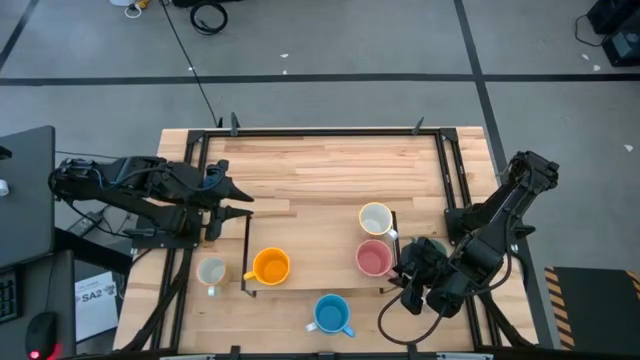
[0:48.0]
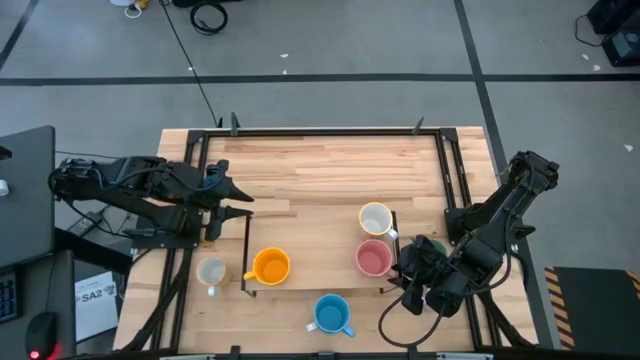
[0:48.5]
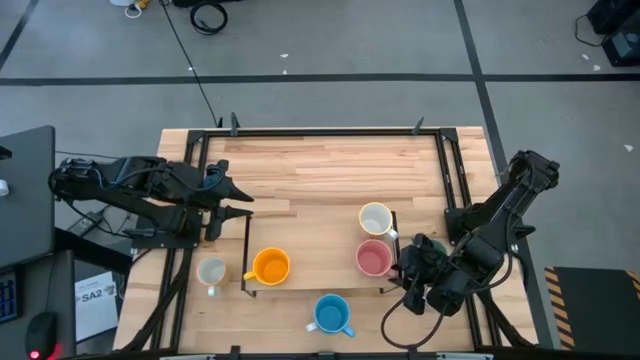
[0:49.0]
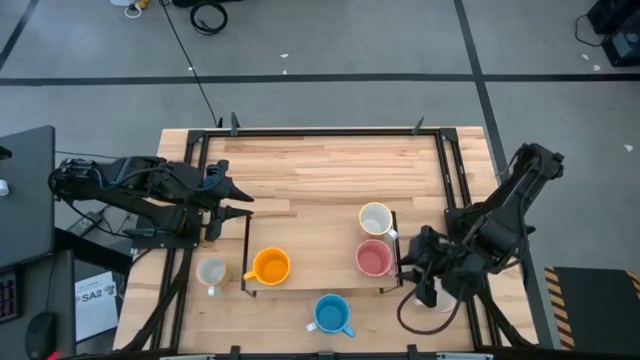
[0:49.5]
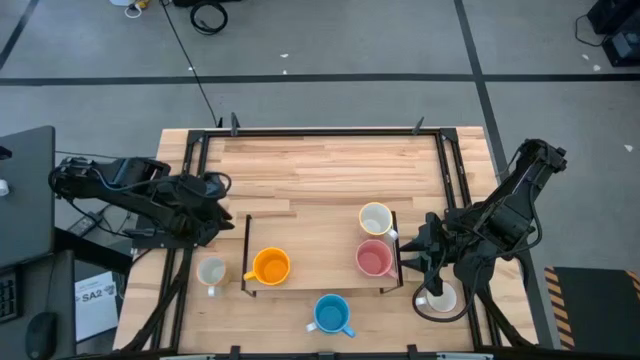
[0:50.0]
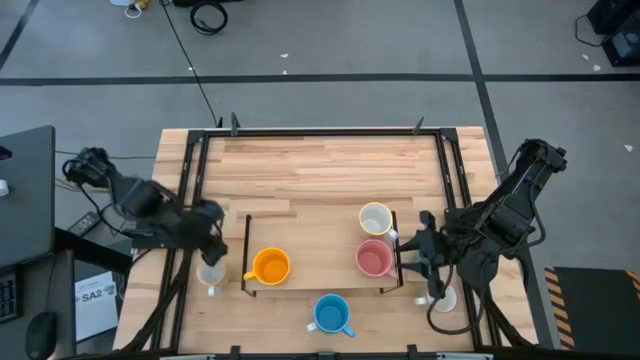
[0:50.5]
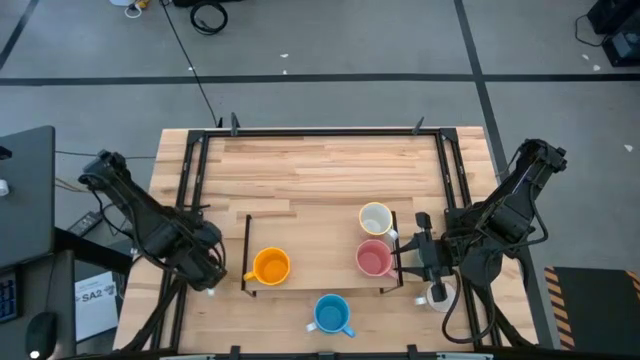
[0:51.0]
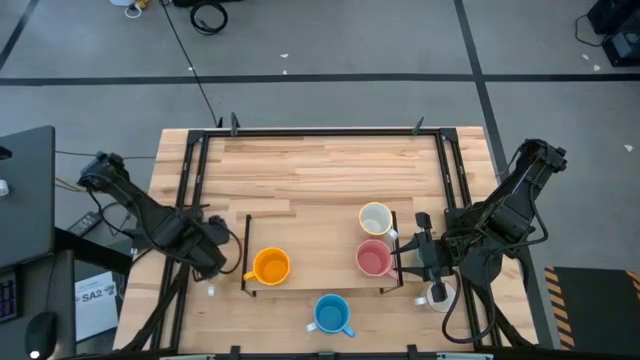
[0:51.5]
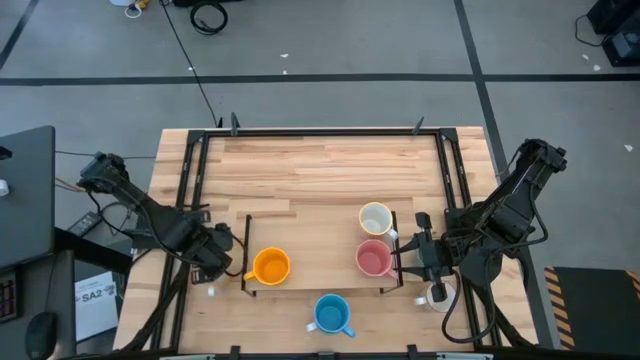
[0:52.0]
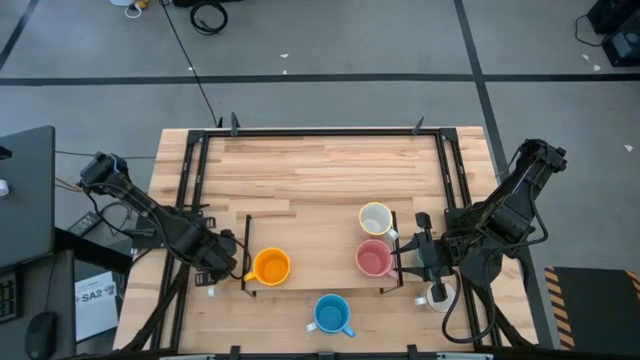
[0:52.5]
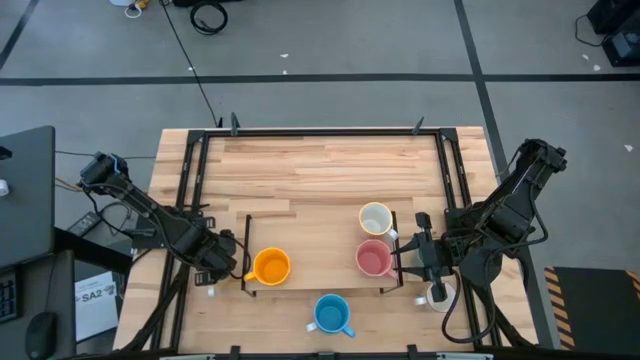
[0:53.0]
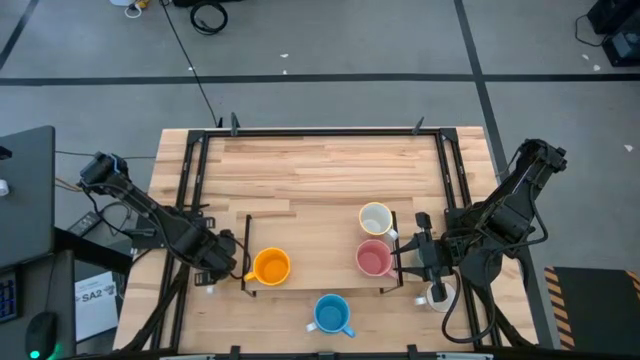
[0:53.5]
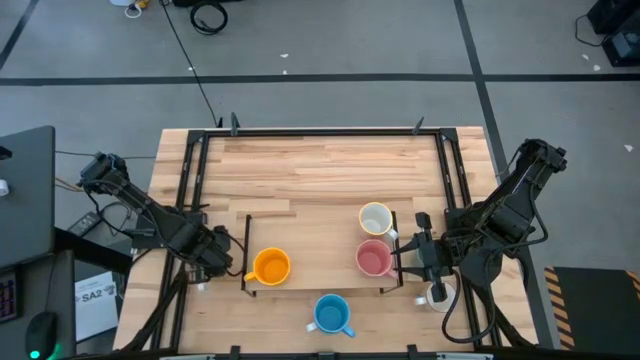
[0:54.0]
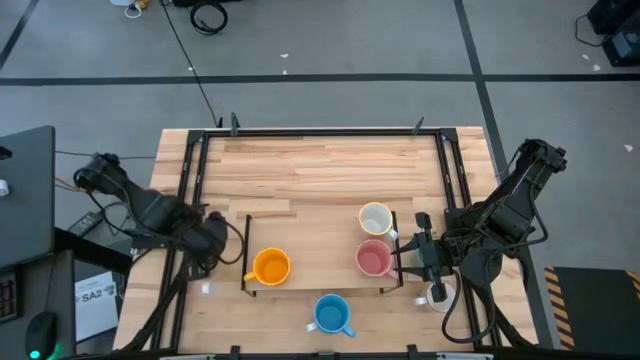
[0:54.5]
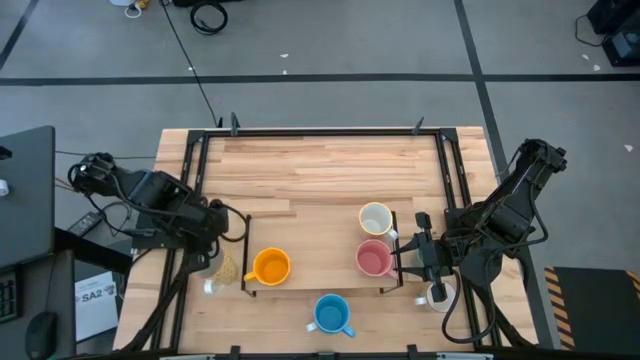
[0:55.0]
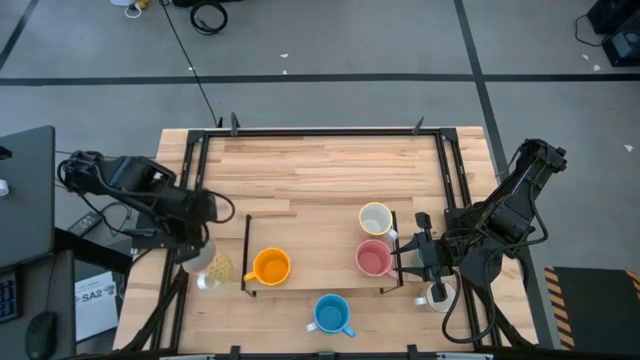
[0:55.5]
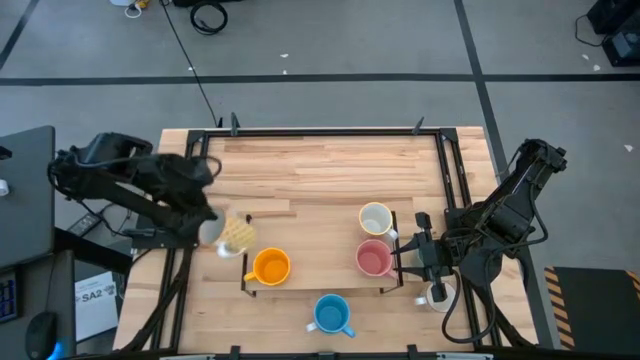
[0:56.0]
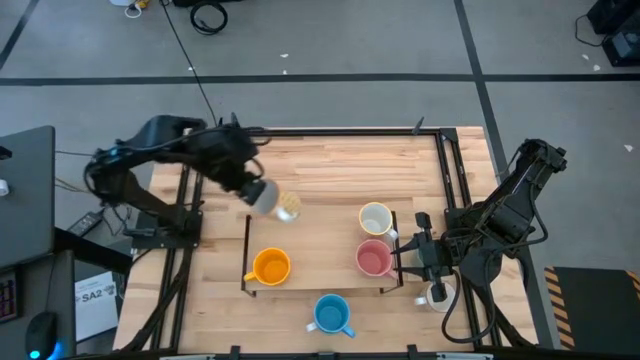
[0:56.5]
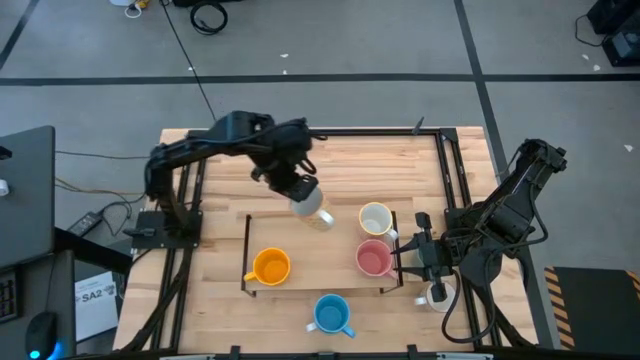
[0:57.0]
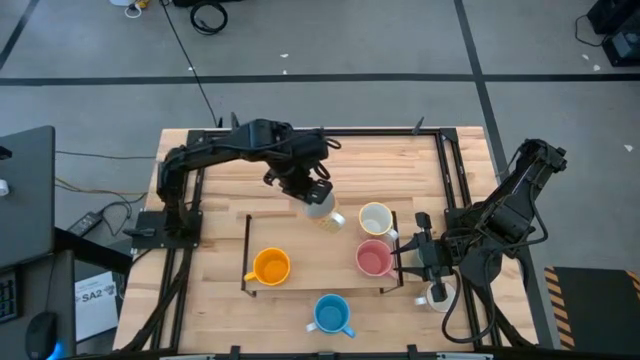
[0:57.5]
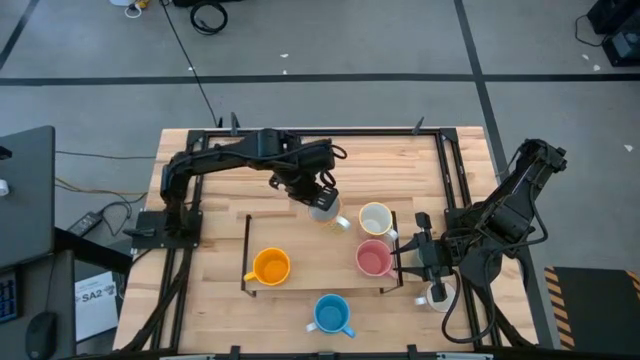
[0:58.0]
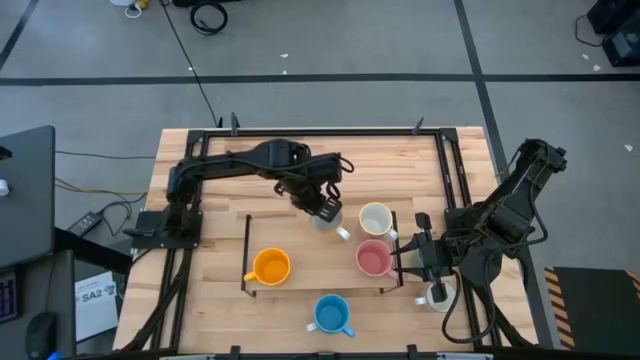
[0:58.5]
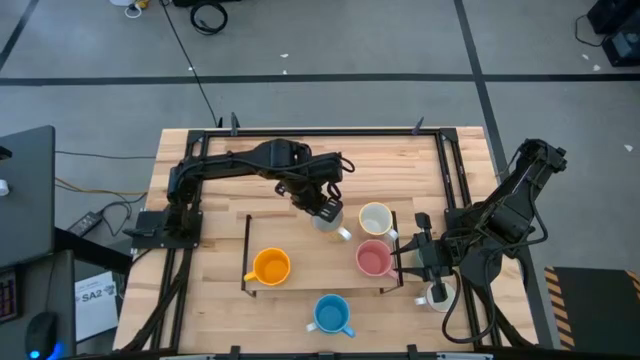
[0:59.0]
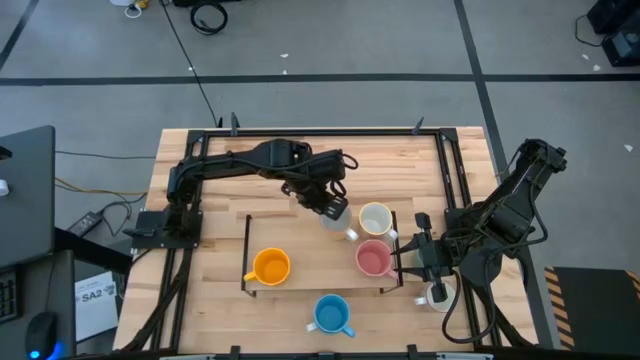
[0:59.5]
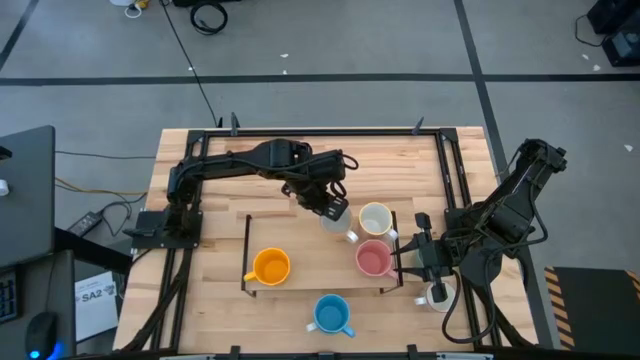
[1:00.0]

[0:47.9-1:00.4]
Task: Place coffee mugs
Put the yellow patterned mug on the shelf

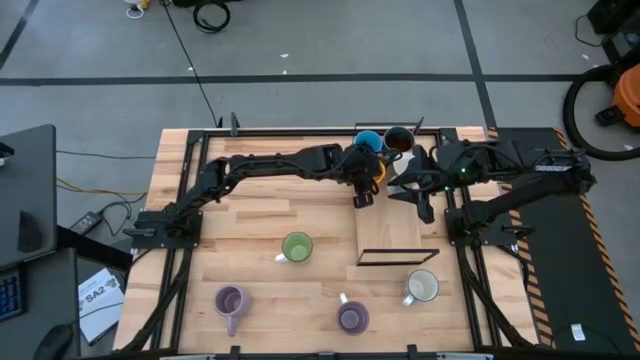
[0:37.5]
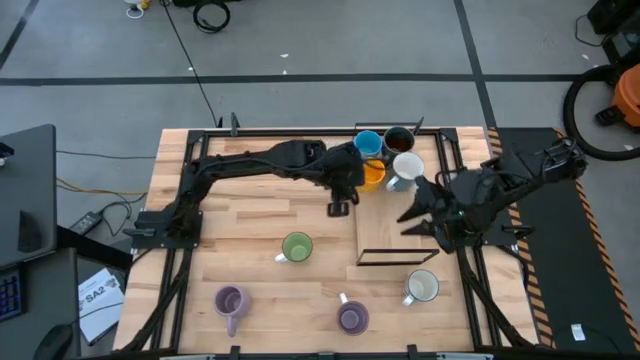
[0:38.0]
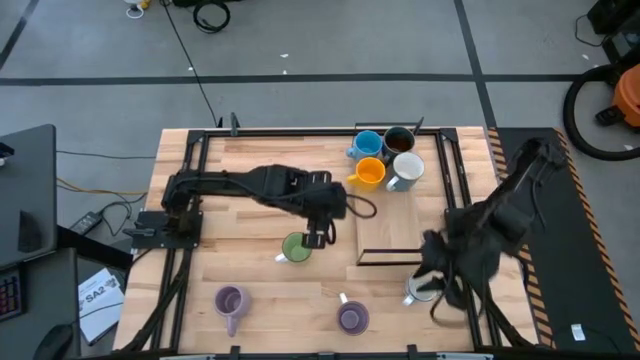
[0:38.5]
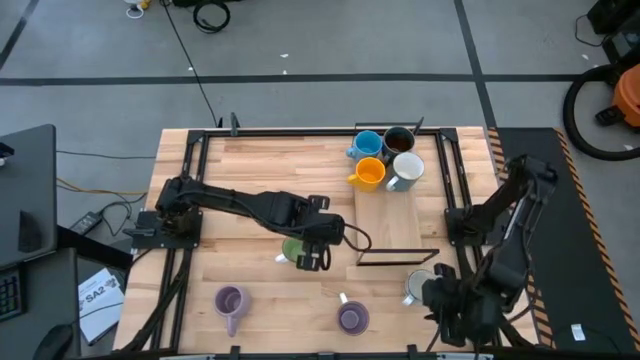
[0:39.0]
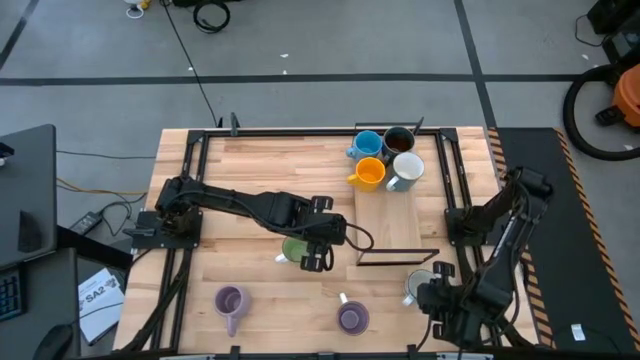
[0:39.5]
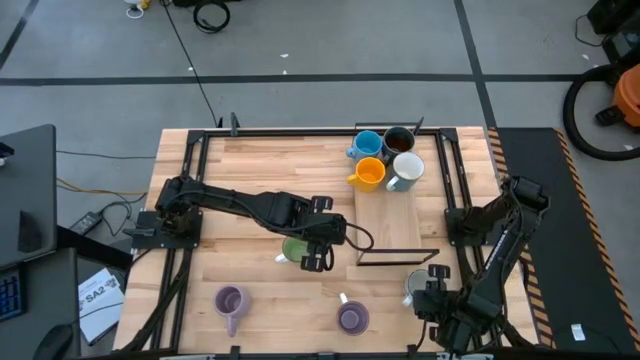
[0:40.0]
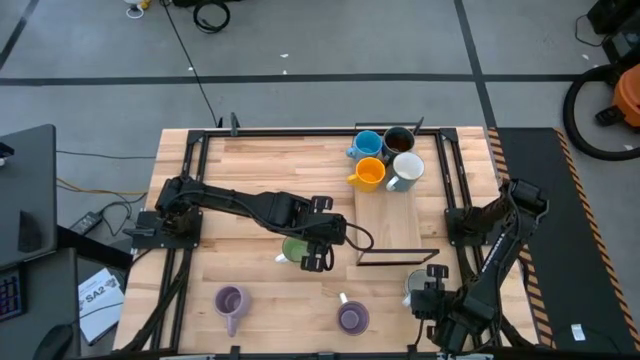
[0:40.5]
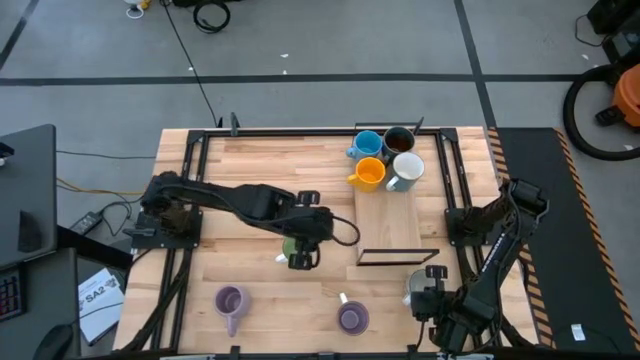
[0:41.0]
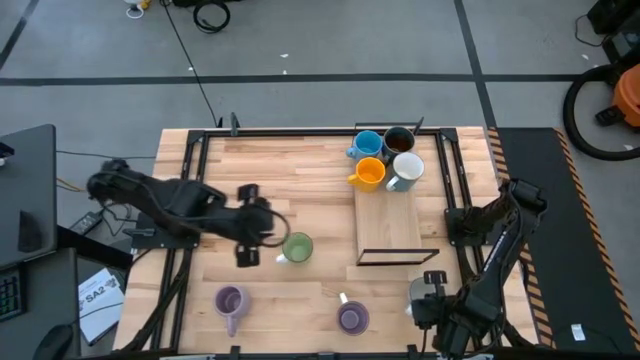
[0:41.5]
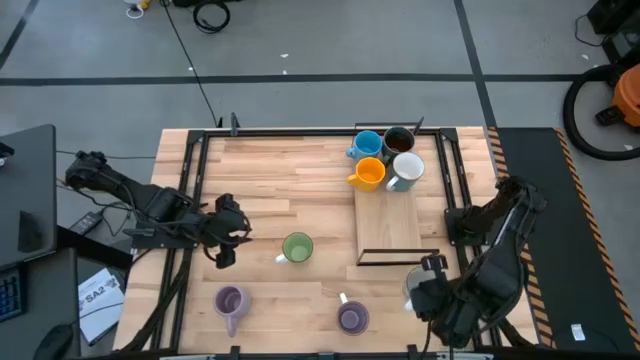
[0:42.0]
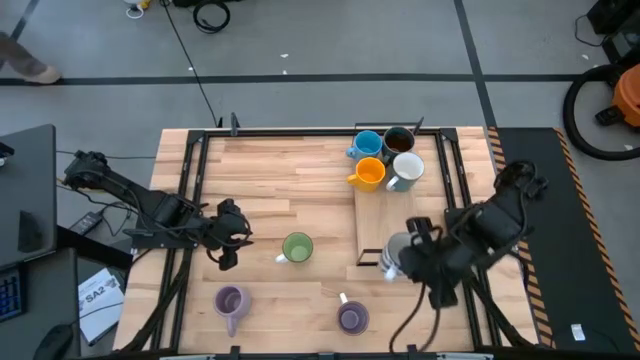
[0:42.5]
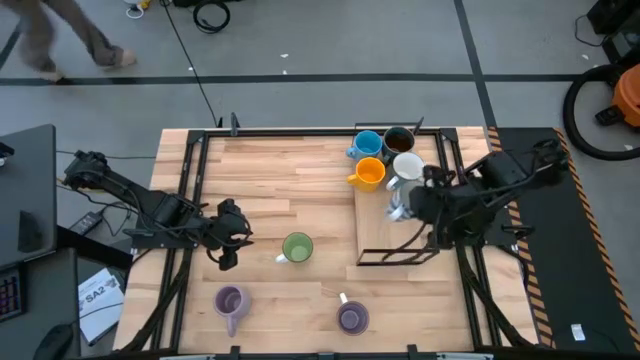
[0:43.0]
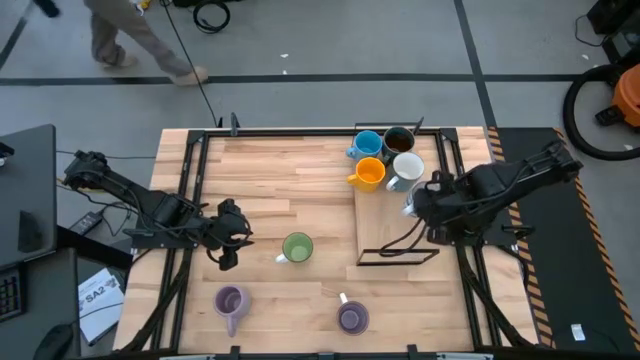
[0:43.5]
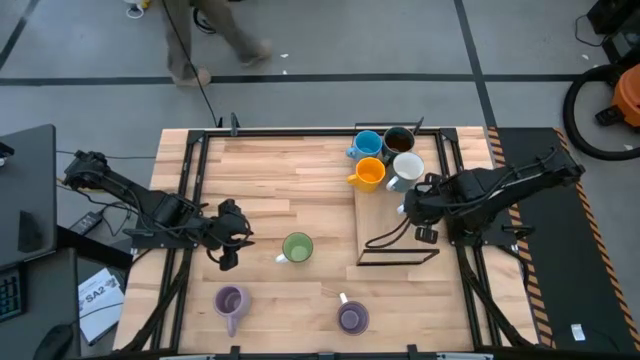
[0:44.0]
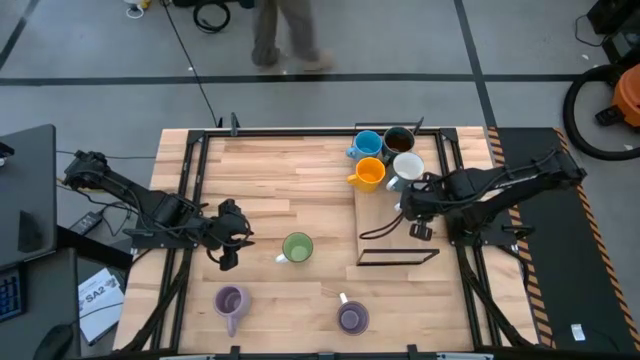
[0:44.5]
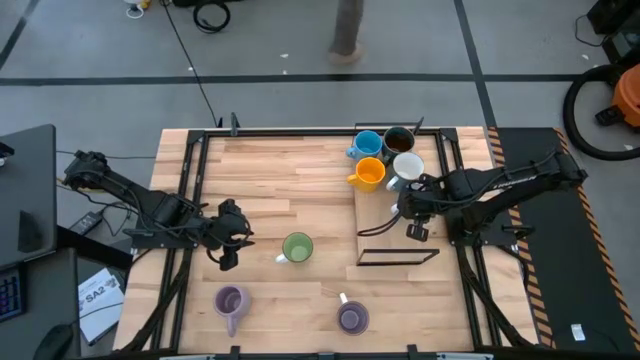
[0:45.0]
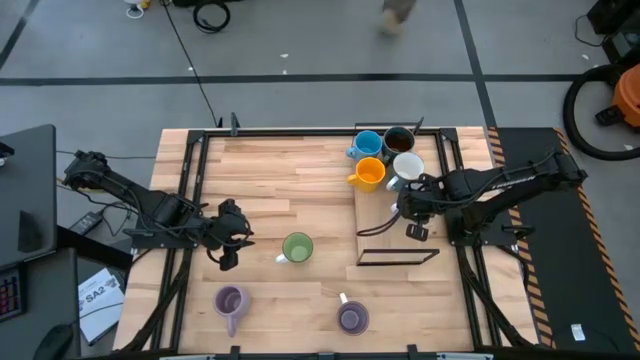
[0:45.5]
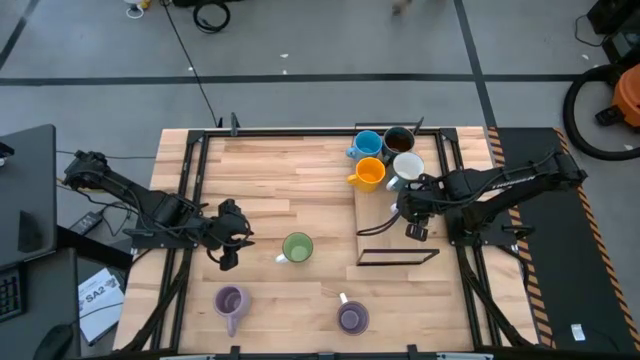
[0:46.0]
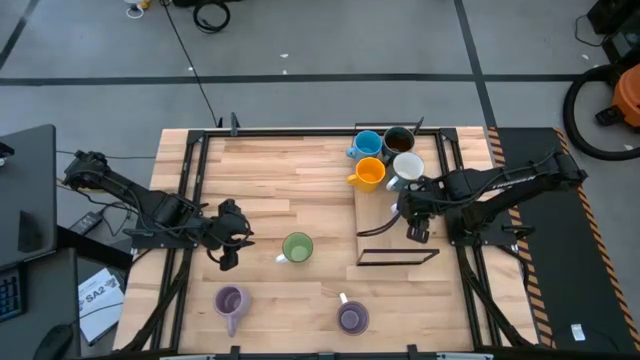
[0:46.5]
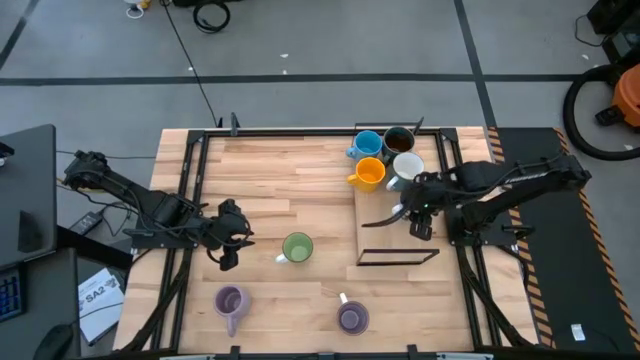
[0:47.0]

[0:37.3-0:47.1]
Task: Place coffee mugs
Put the patterned mug on the shelf
